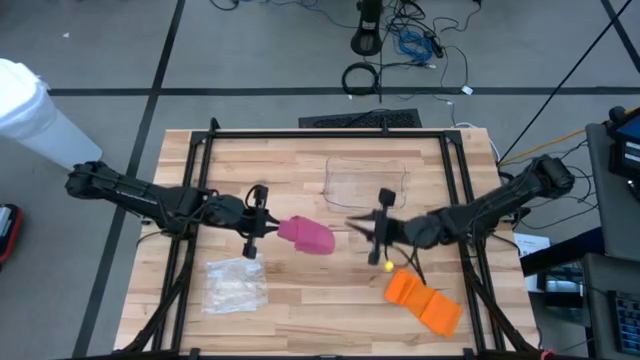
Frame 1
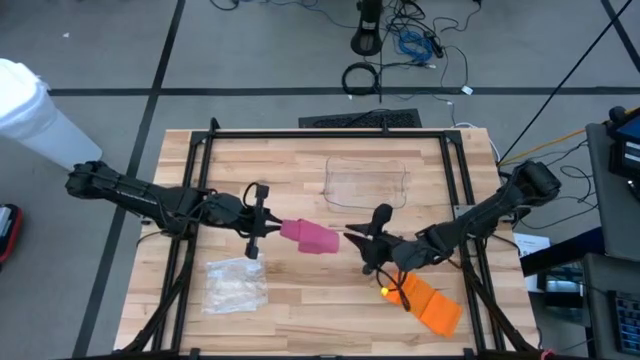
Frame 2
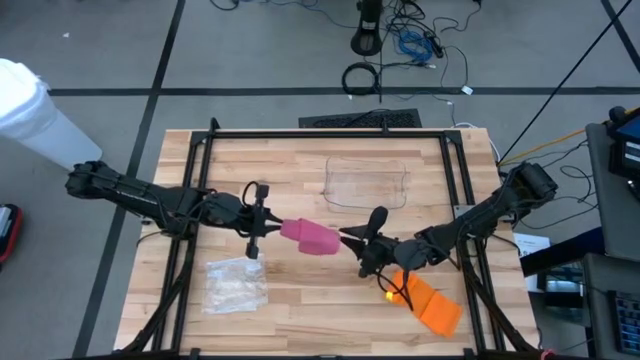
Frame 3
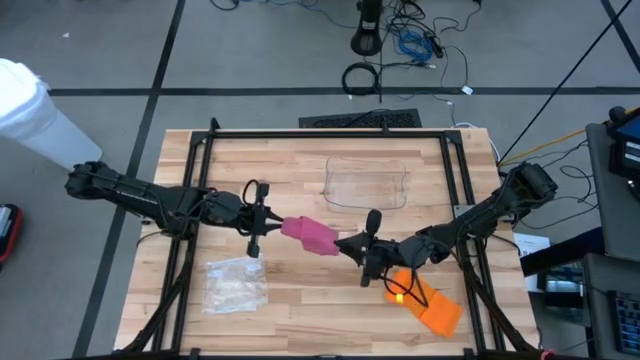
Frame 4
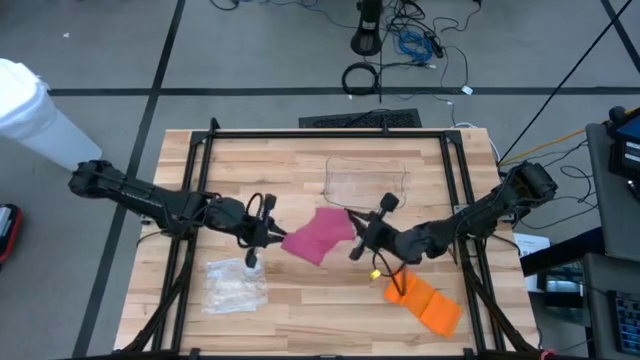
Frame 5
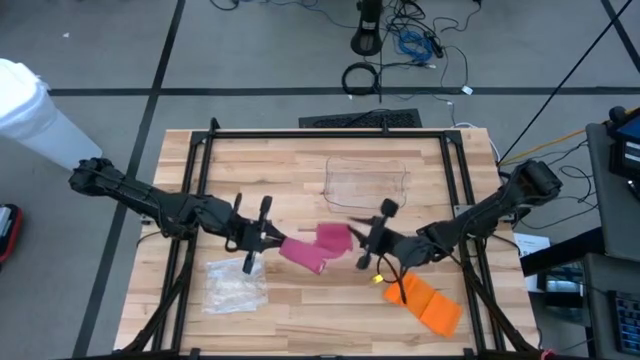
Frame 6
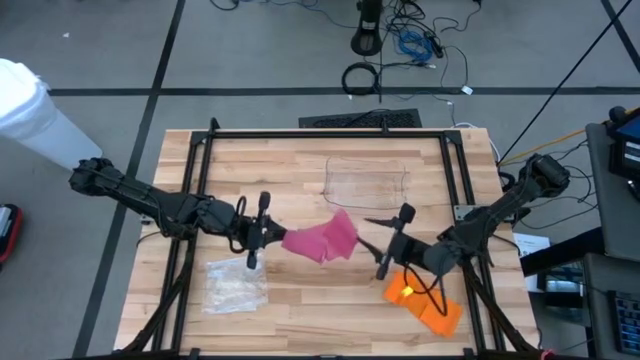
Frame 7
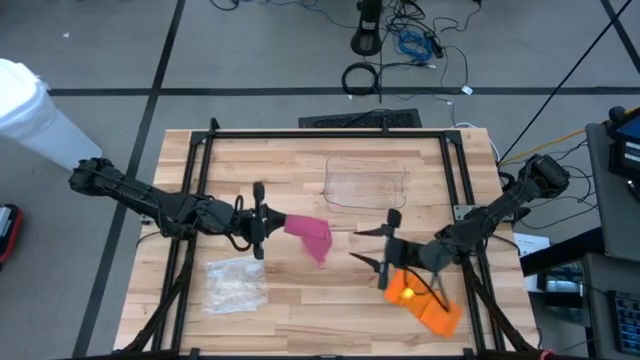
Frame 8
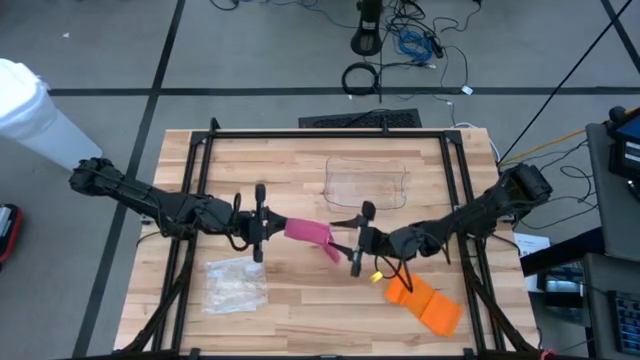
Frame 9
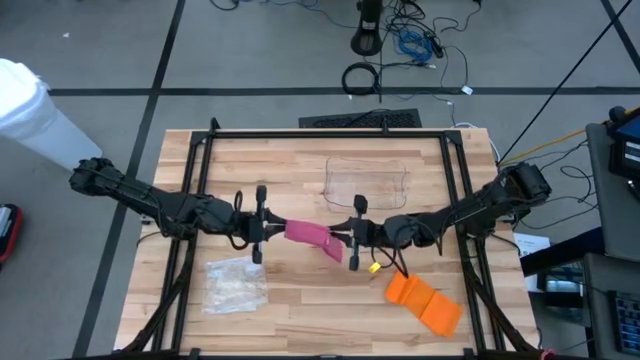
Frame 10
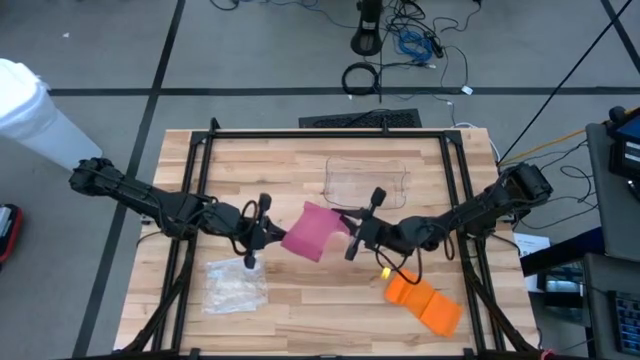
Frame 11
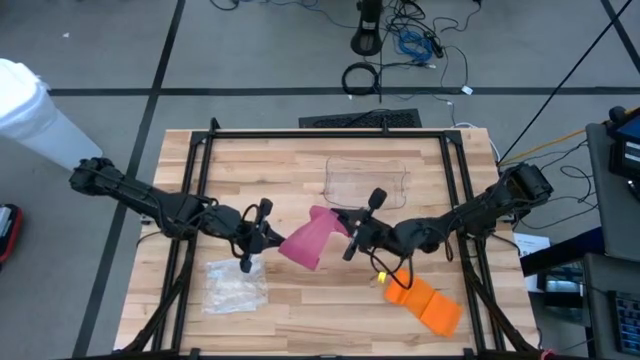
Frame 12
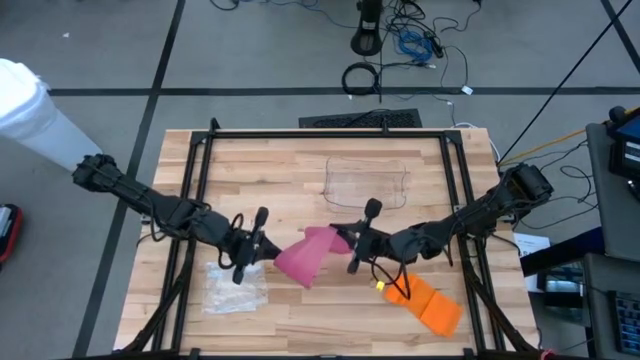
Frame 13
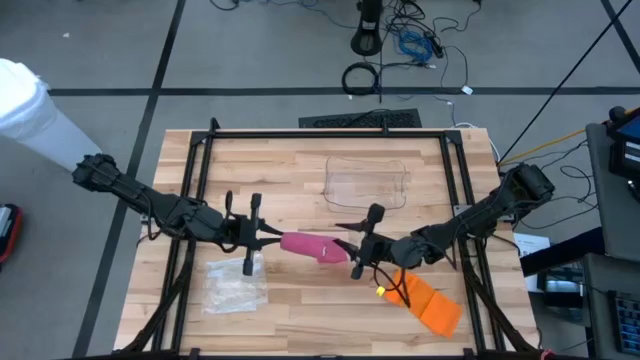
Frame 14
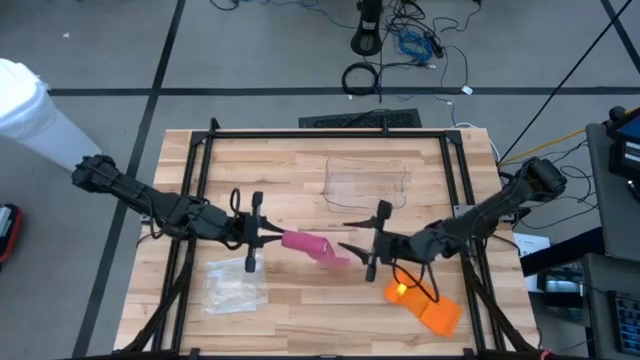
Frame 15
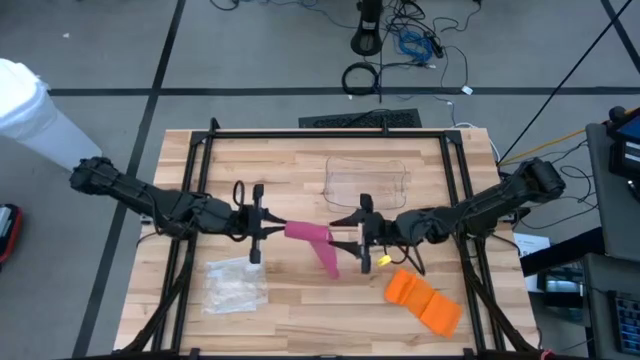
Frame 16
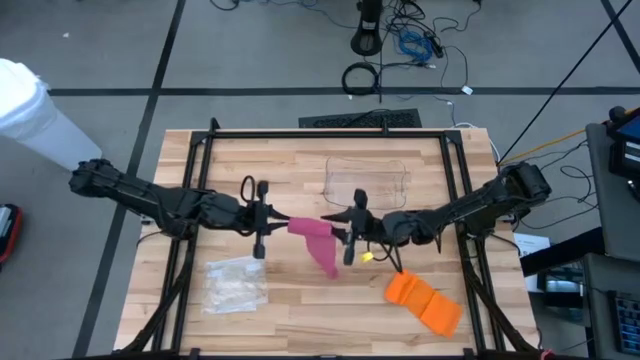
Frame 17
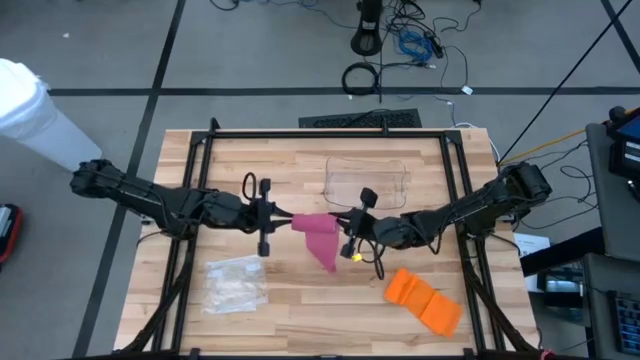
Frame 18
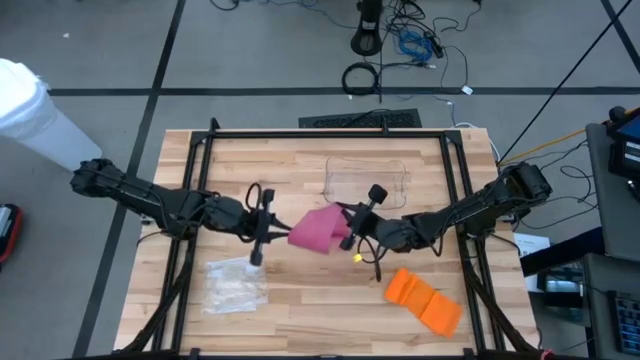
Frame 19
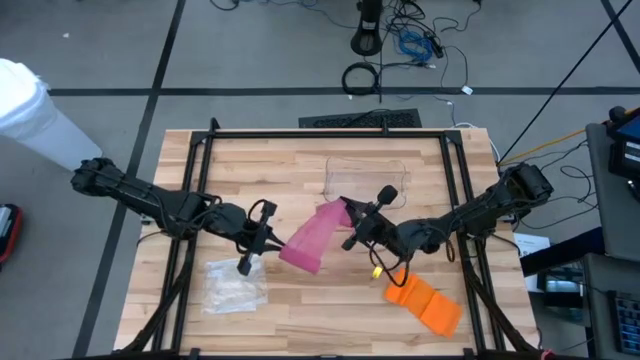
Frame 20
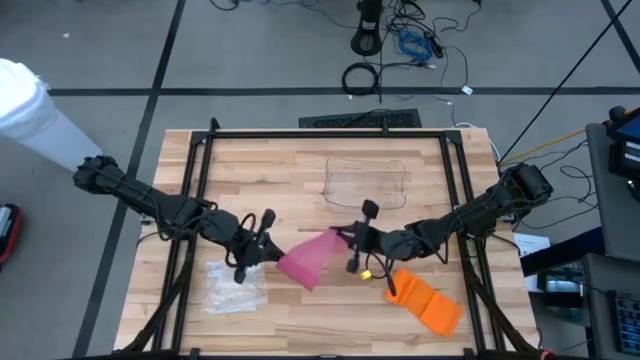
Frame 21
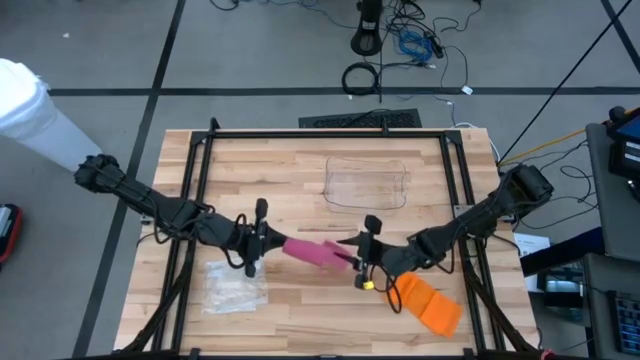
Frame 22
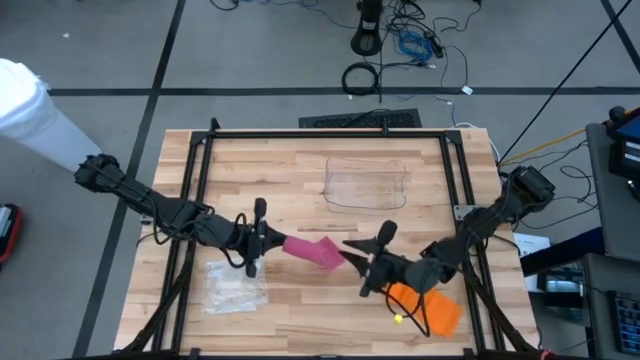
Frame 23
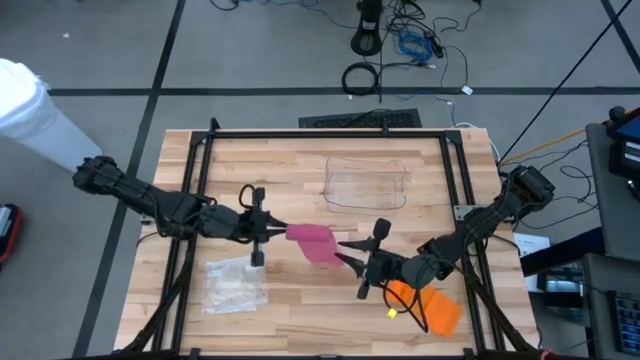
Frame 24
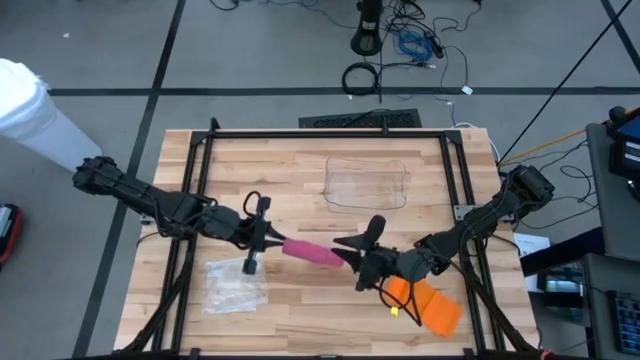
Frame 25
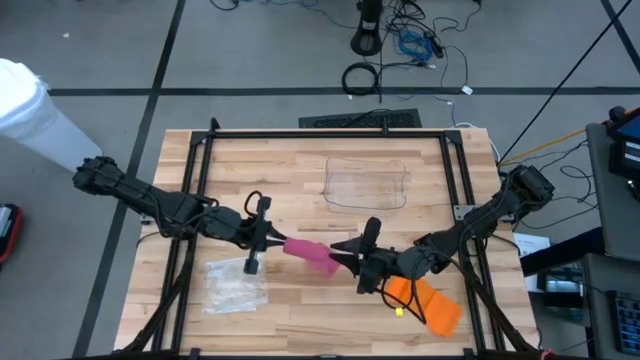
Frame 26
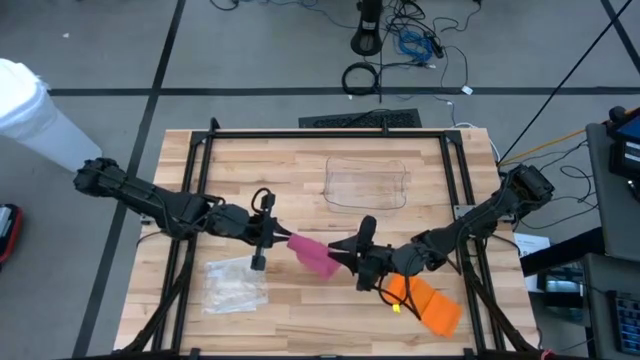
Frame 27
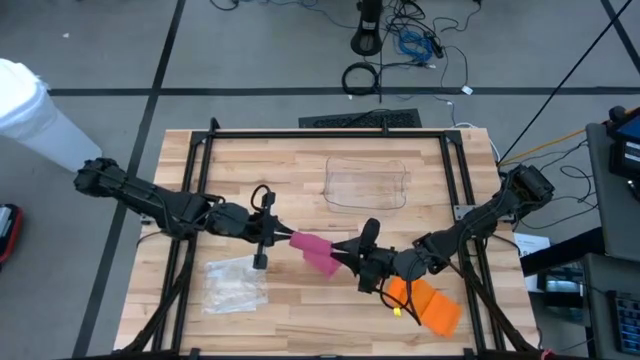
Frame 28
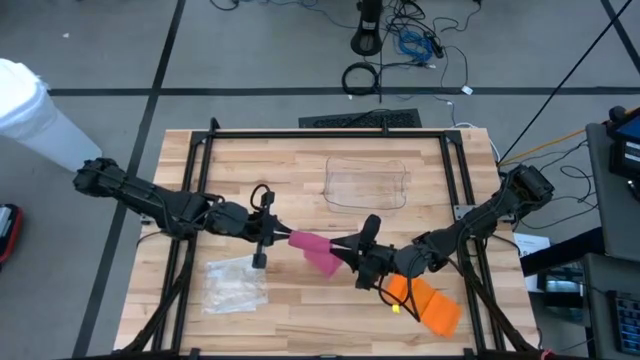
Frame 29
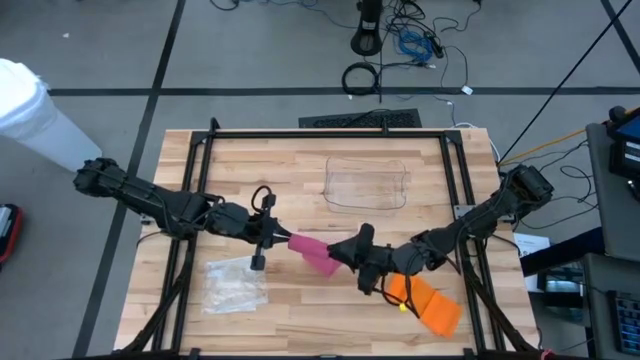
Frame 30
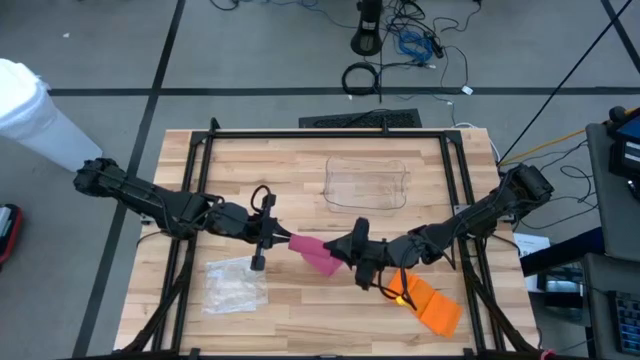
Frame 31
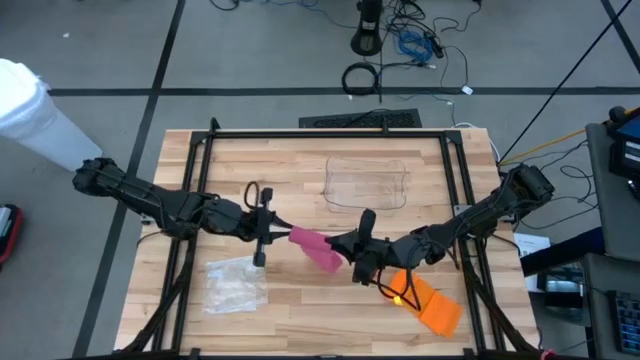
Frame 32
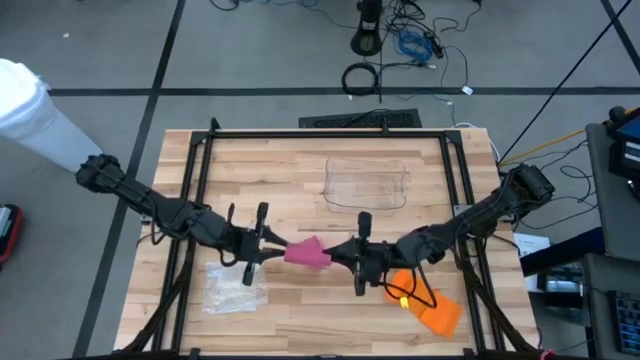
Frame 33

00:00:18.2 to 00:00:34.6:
Task: Roll bandage
Roll the pink bandage

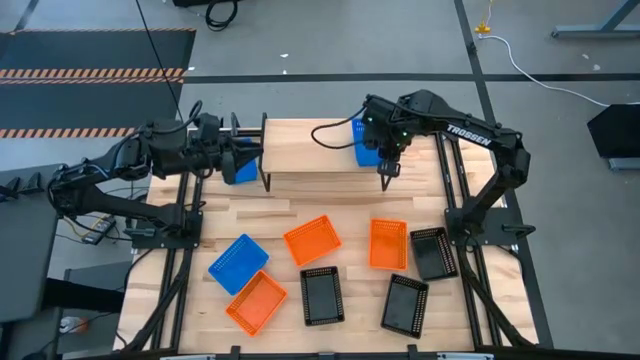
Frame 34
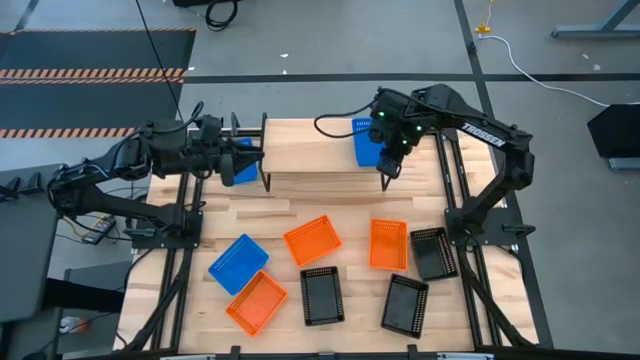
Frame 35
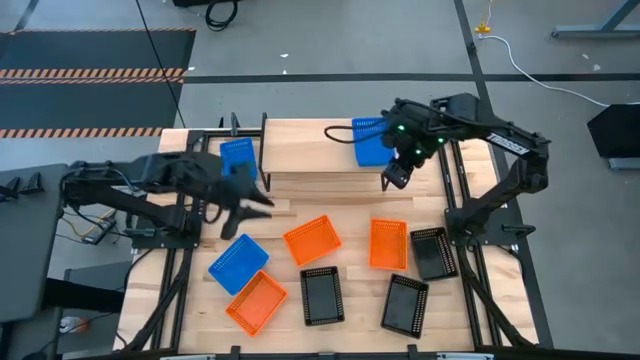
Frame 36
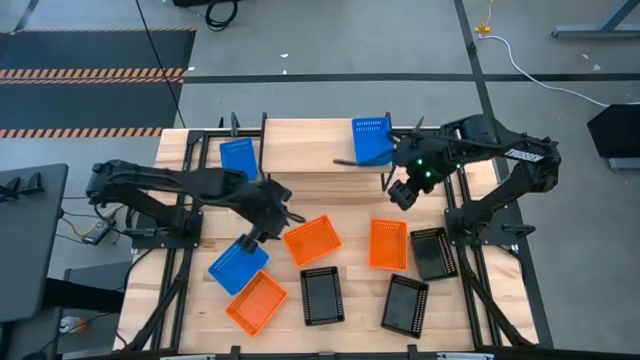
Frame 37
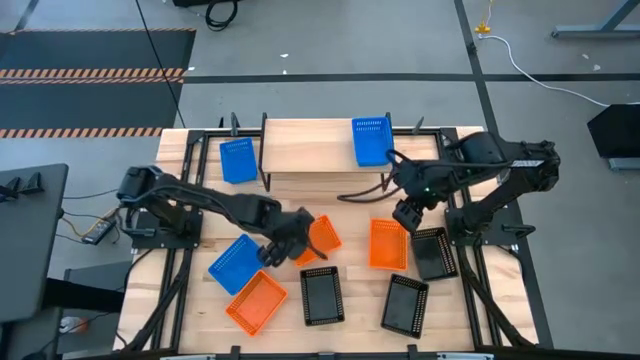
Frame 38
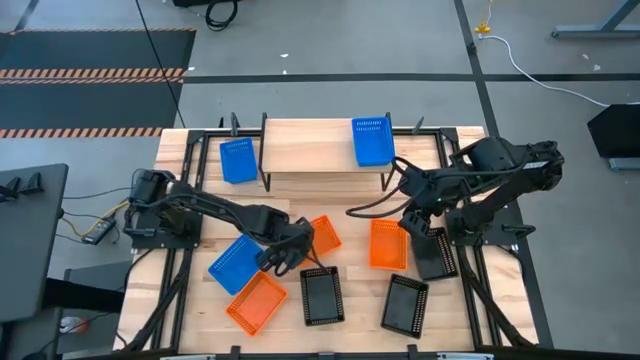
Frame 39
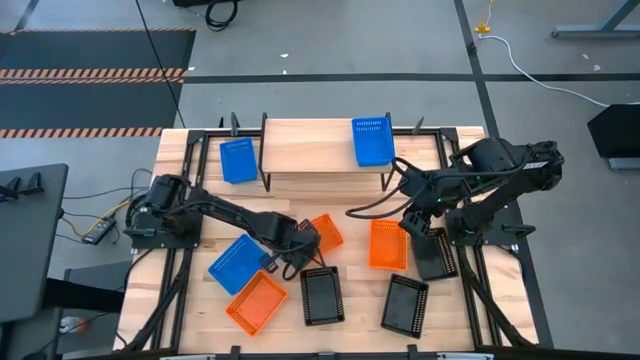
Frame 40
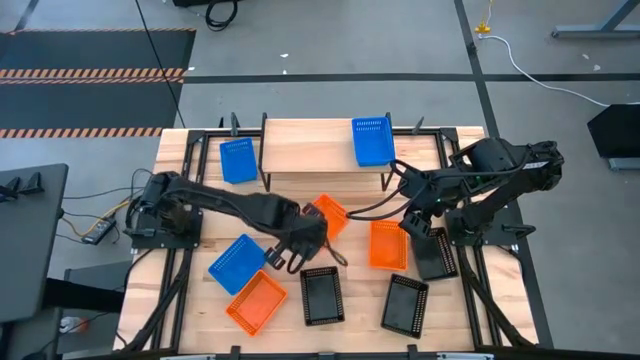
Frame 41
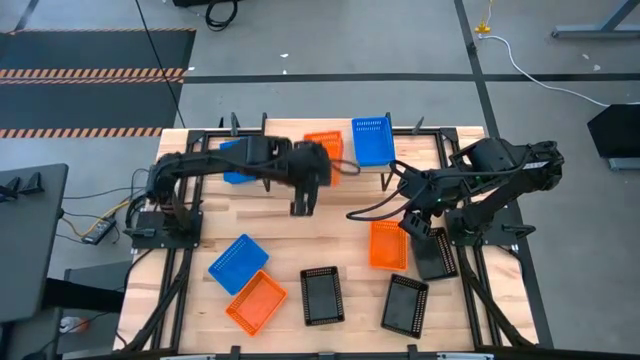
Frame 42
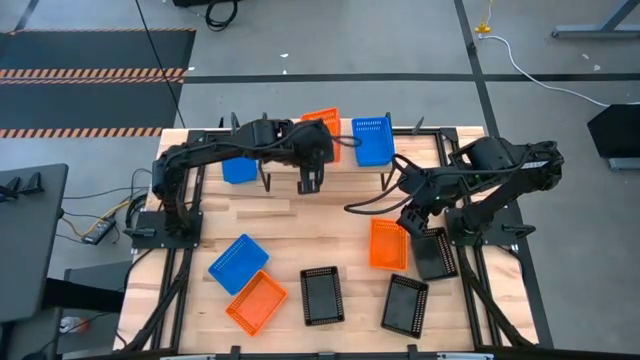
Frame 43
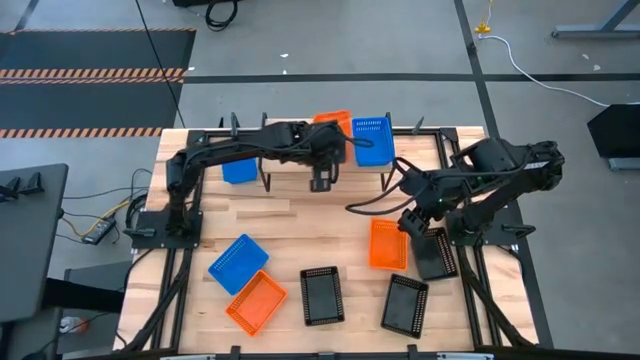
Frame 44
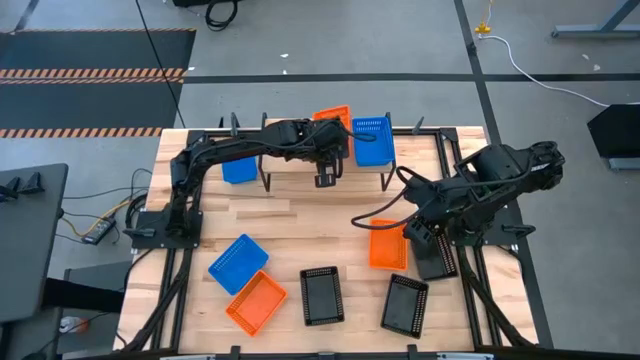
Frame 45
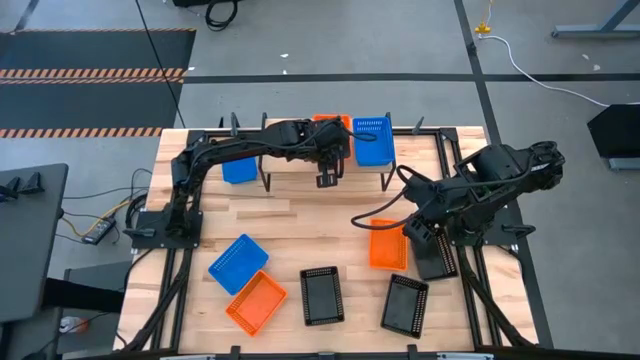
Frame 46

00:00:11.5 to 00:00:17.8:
Task: Stack baskets on shelf by color
Put the middle orange bin on the shelf
